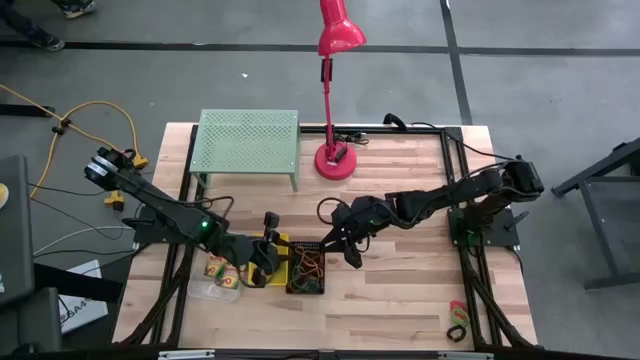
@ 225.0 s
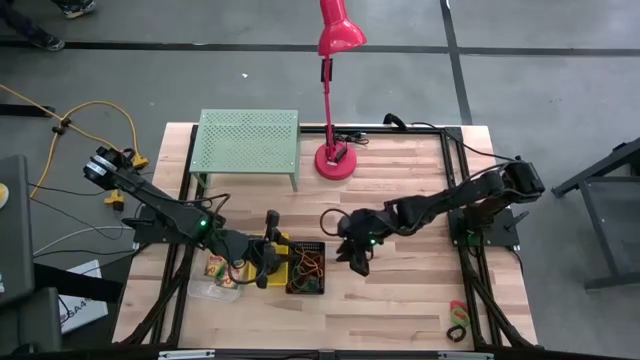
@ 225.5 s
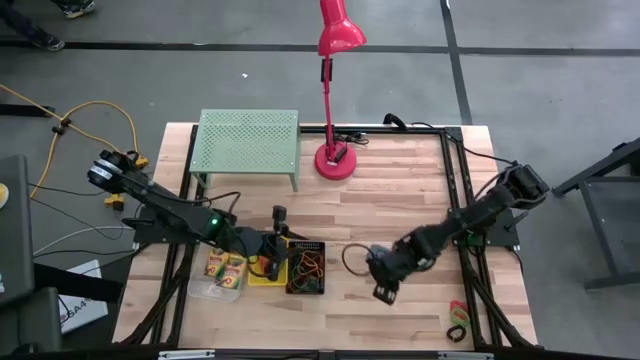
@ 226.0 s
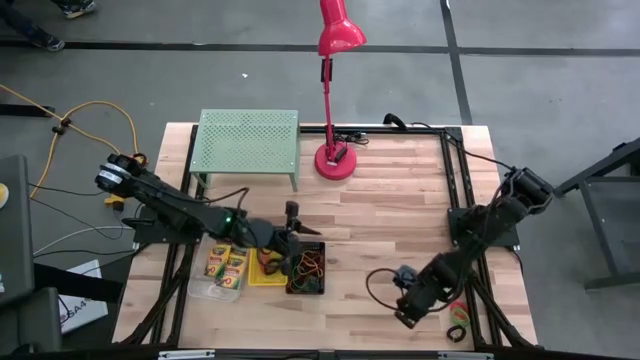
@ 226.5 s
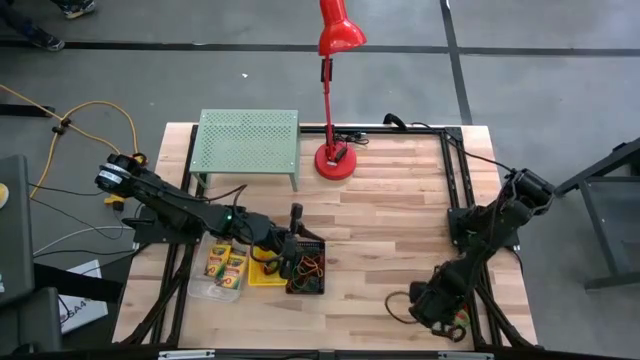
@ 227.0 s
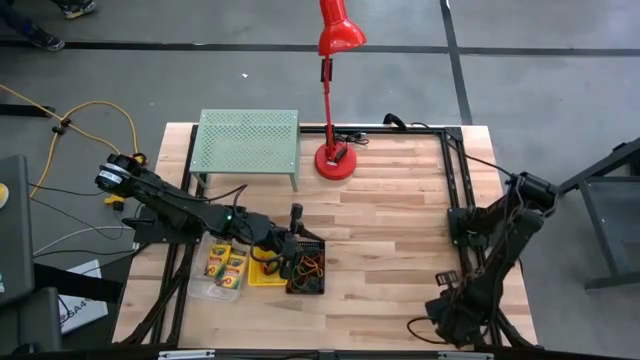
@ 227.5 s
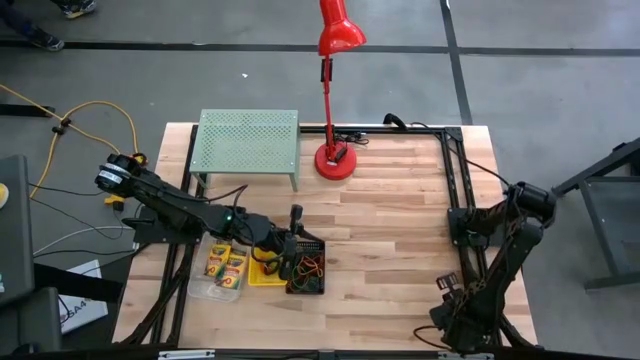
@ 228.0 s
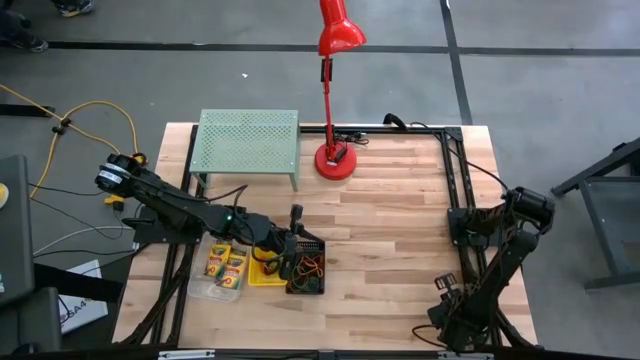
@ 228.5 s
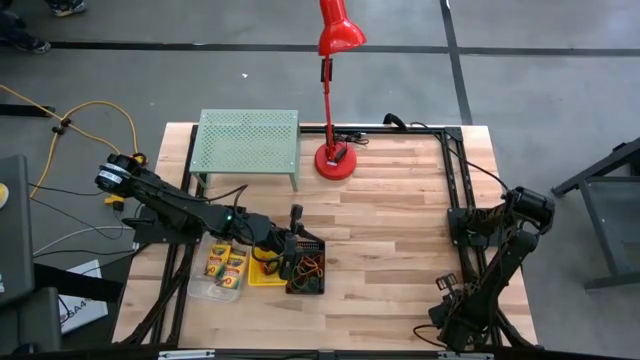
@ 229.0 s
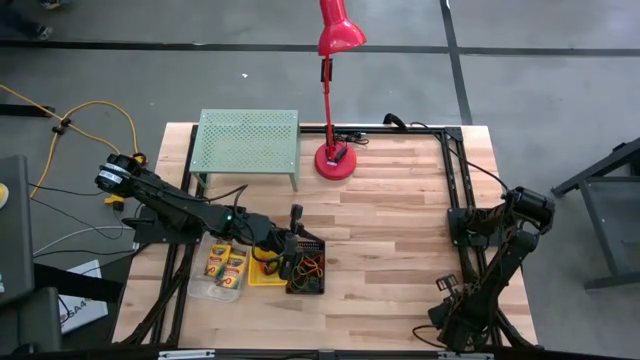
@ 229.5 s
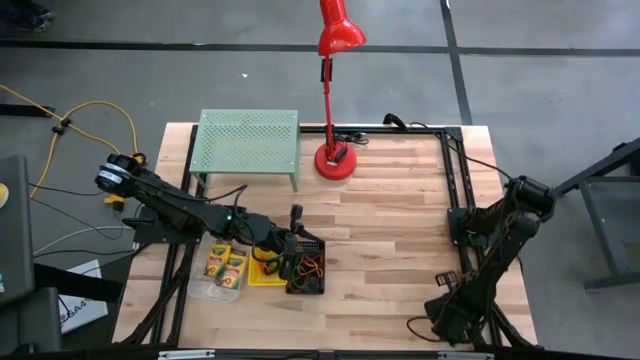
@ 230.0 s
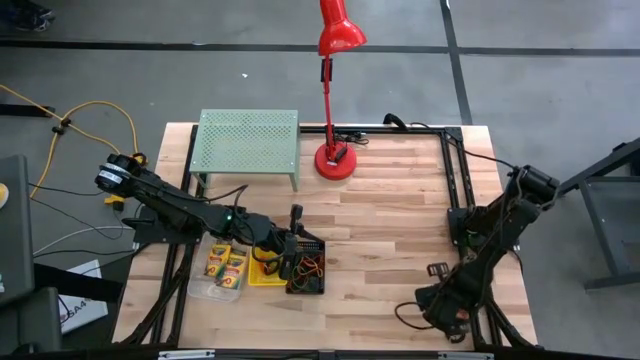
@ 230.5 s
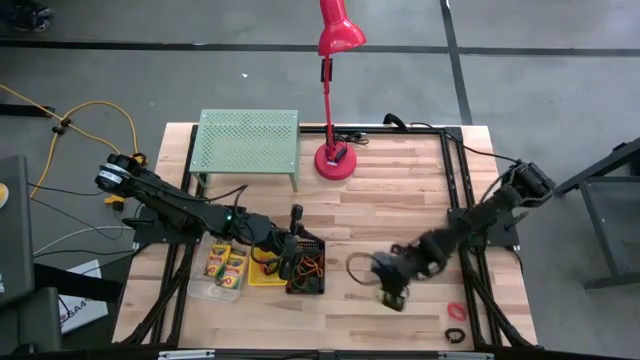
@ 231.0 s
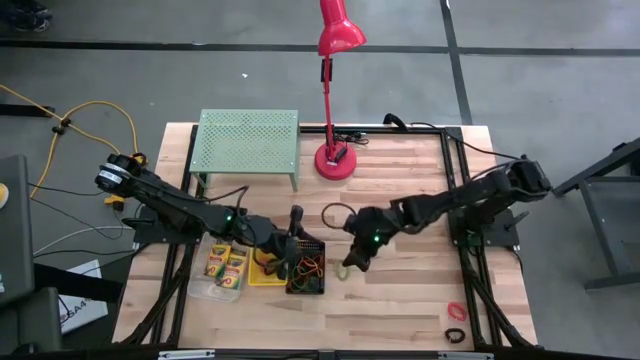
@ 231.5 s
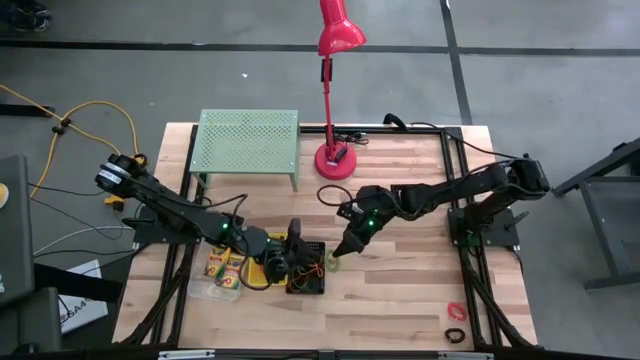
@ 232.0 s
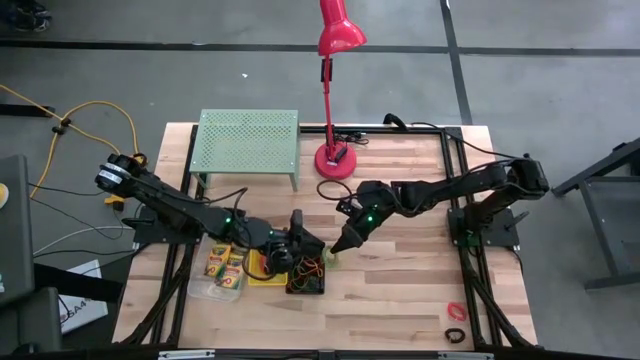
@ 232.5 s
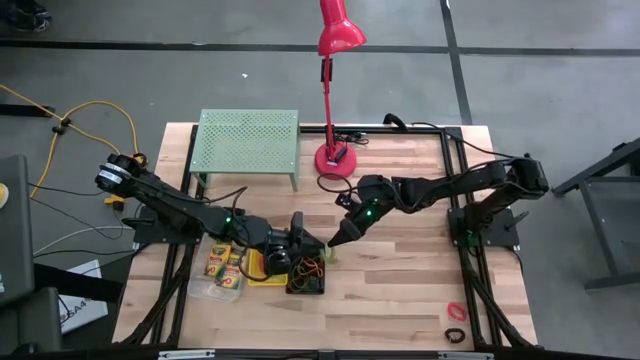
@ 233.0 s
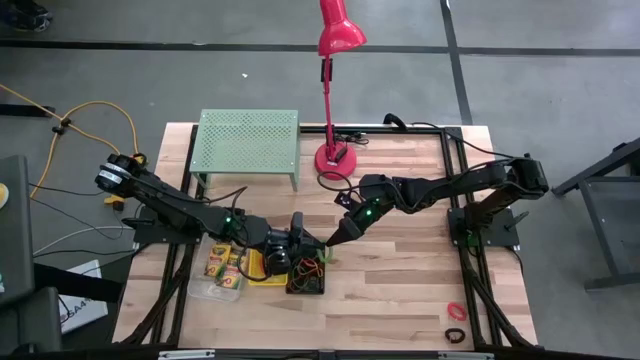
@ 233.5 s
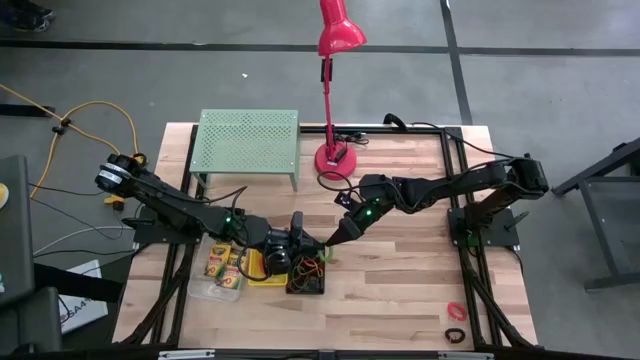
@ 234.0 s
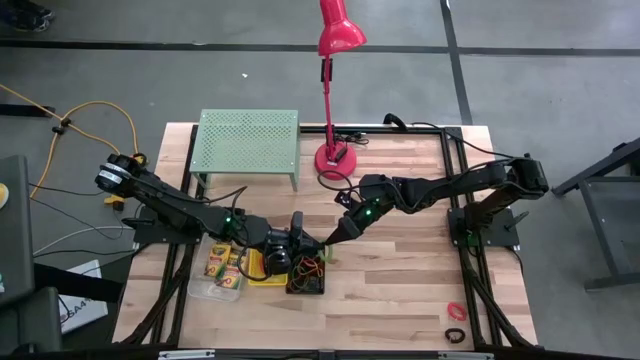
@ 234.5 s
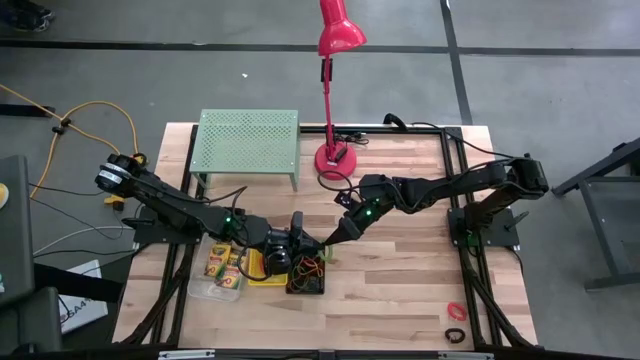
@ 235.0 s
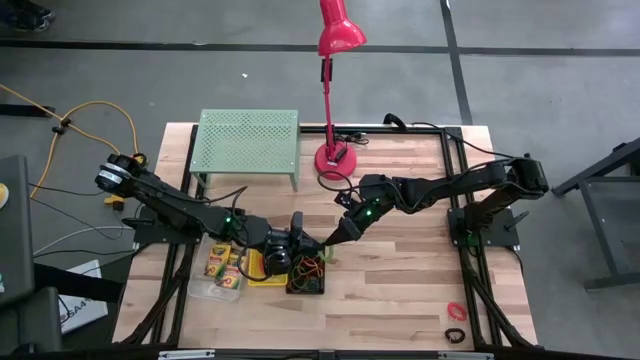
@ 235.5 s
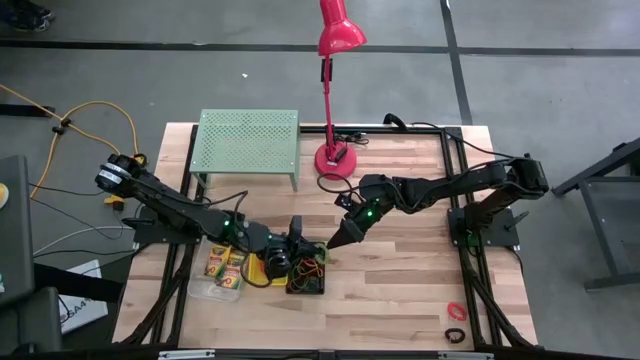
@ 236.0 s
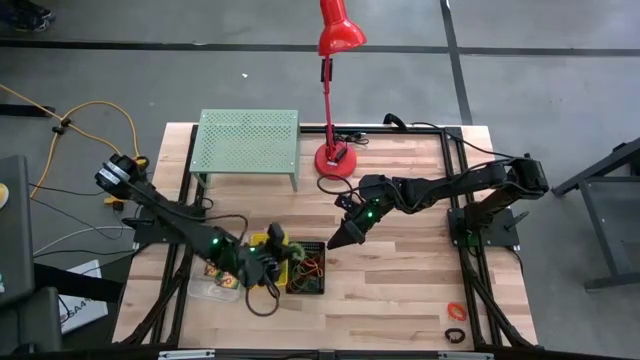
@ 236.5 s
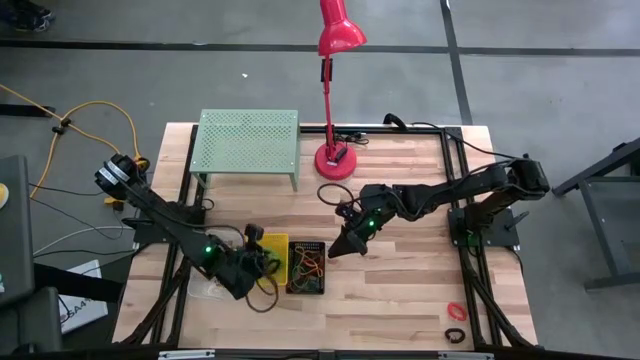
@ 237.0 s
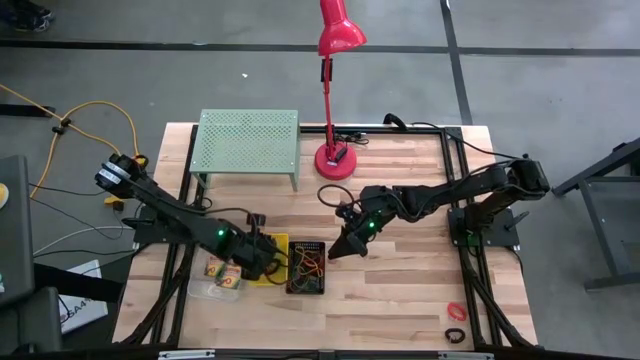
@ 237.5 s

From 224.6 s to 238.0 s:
Task: Pick & Place Office Desk Supplies
Put the green spring keychain into the yellow bin

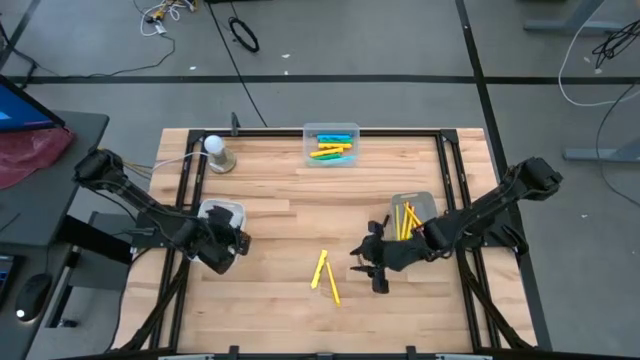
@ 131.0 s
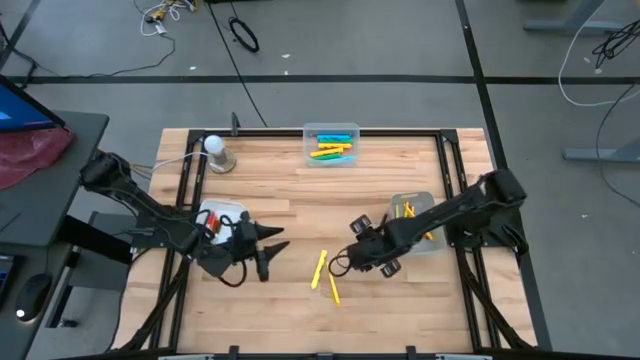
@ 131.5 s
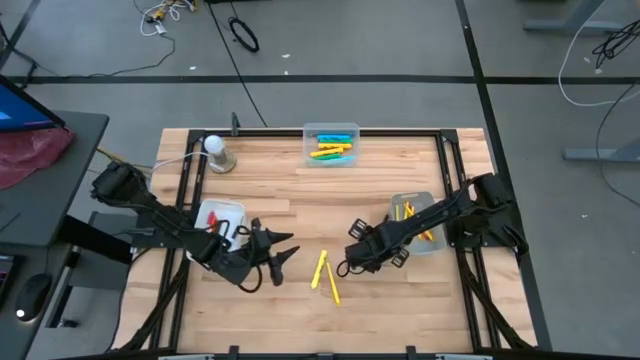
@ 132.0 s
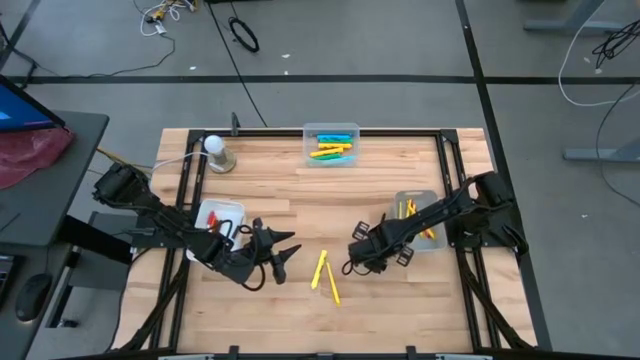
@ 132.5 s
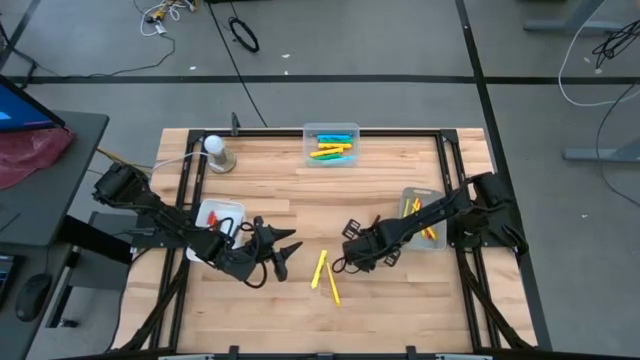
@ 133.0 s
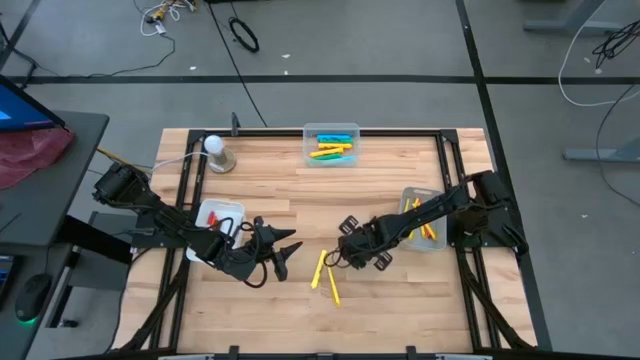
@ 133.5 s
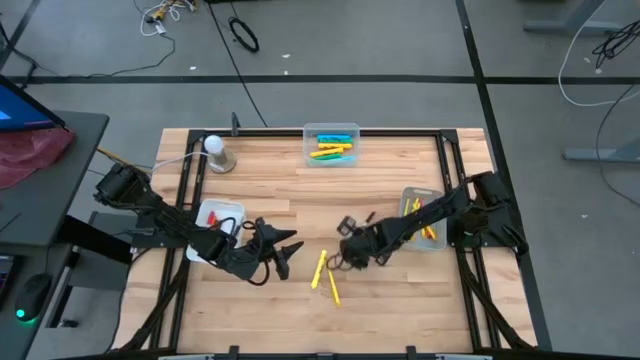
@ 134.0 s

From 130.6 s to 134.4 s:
Task: Pick & Place Markers
Put the black marker pen into the white bin

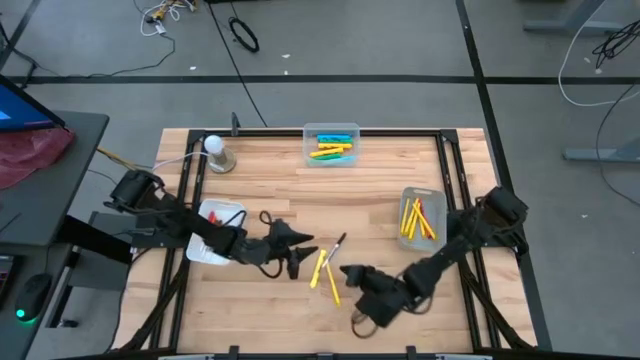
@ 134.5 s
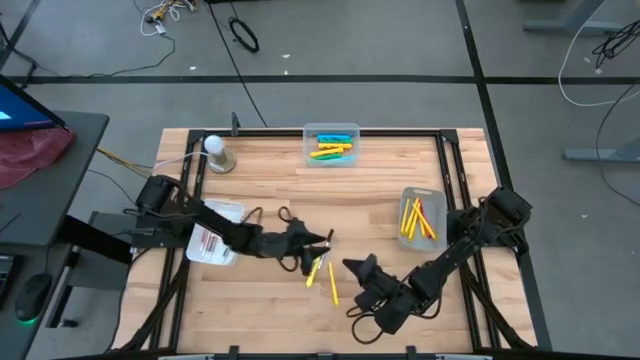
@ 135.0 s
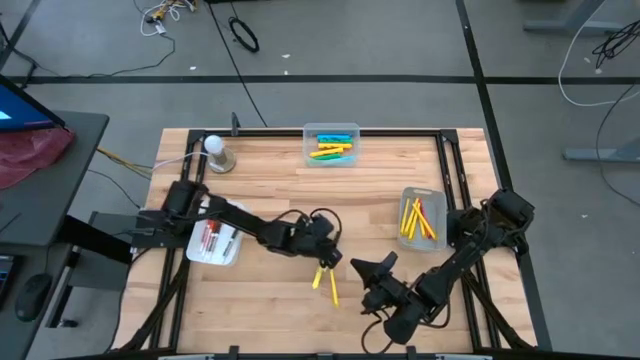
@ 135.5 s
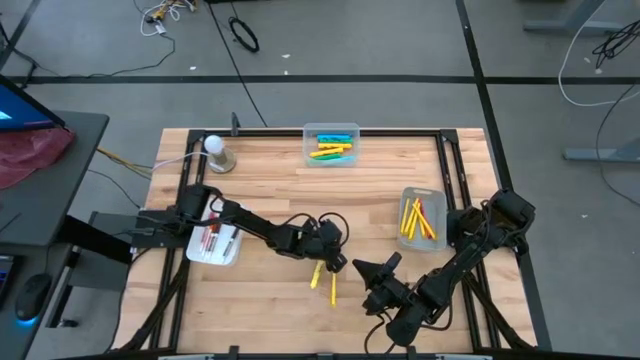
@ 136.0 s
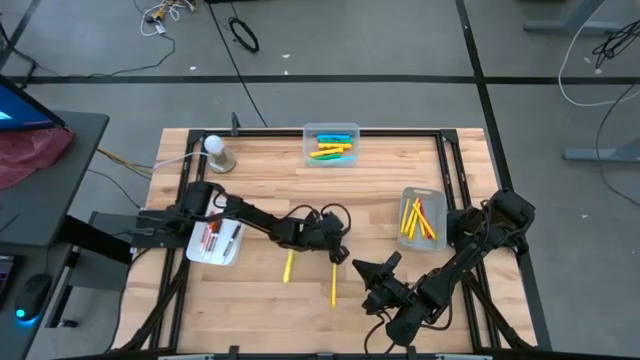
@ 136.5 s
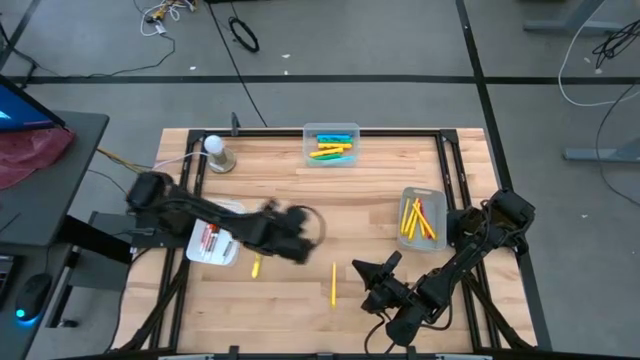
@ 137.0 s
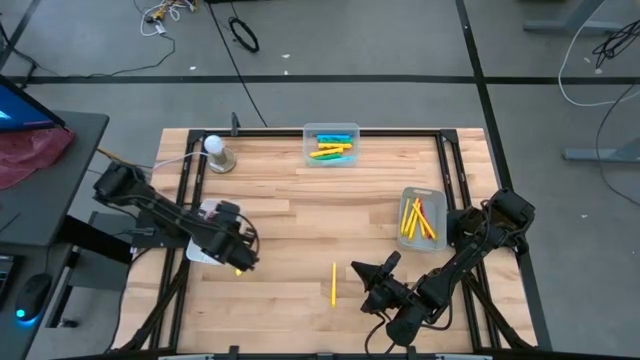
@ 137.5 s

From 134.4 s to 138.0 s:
Put the black marker pen into the white bin
